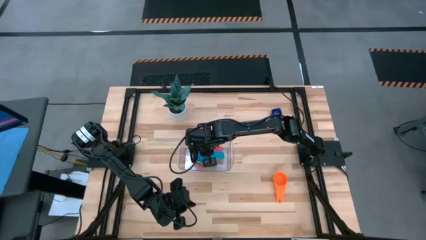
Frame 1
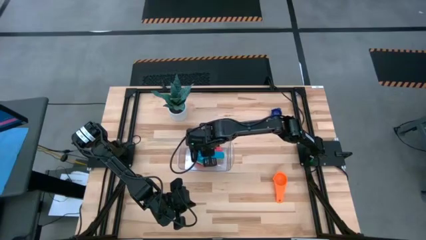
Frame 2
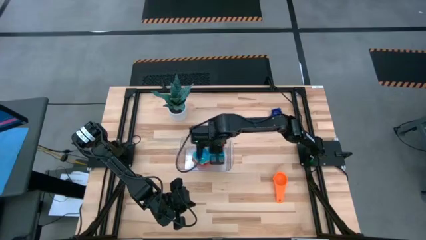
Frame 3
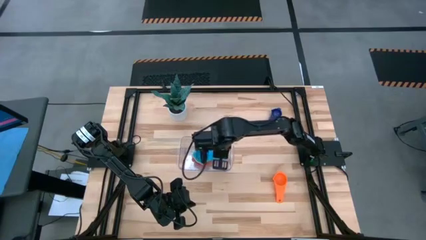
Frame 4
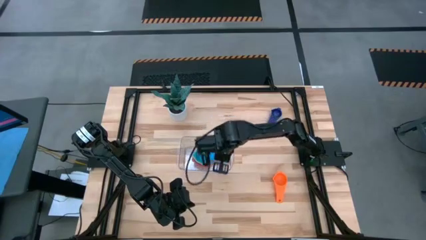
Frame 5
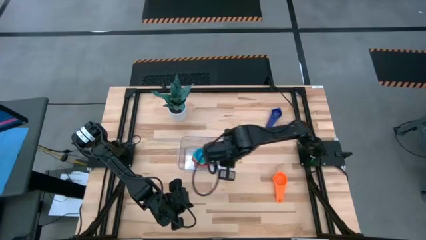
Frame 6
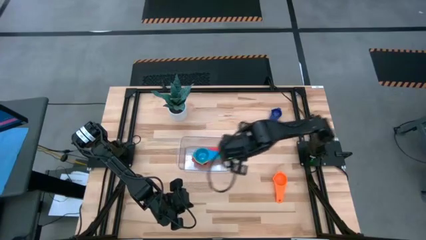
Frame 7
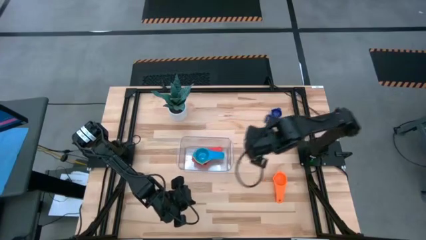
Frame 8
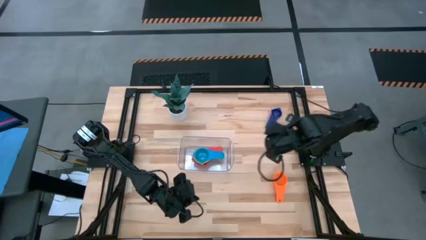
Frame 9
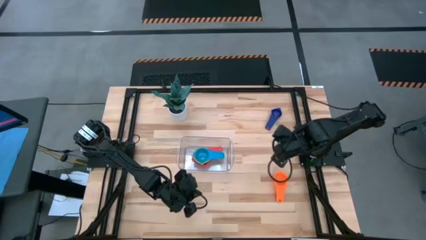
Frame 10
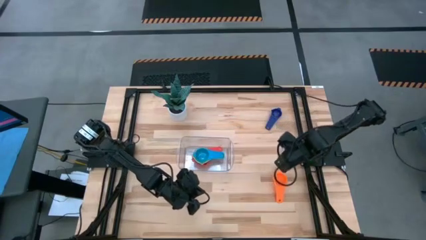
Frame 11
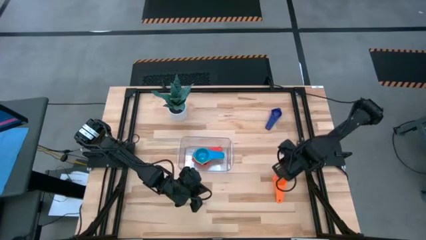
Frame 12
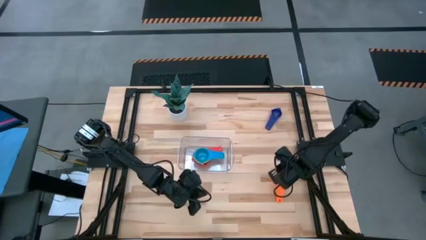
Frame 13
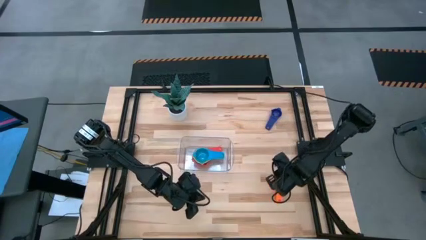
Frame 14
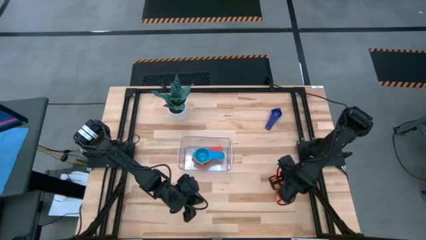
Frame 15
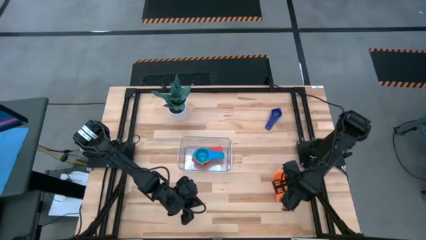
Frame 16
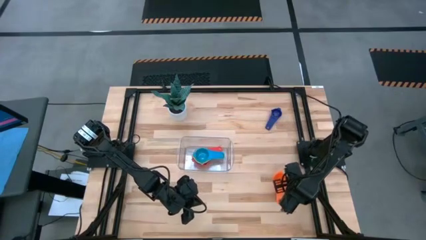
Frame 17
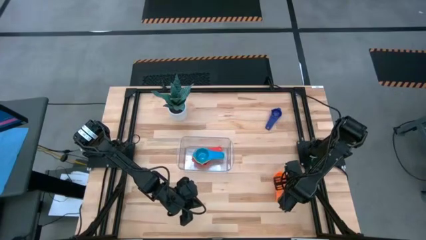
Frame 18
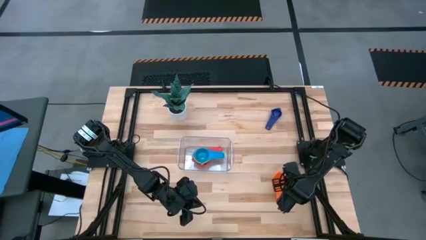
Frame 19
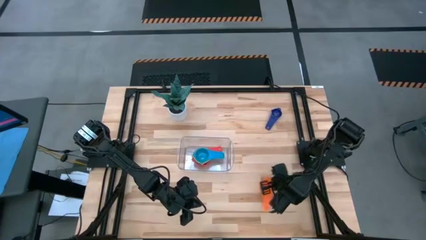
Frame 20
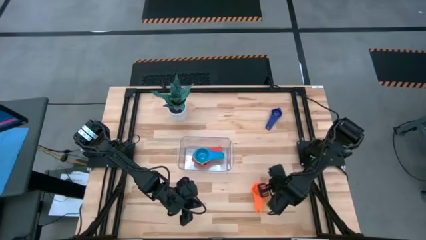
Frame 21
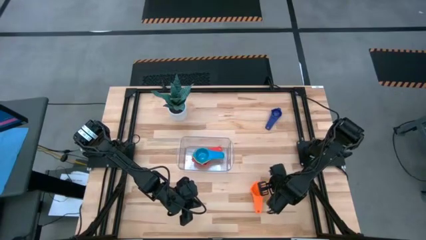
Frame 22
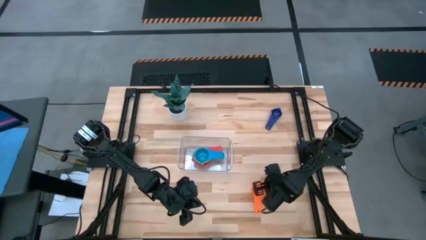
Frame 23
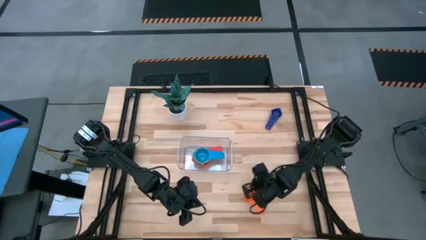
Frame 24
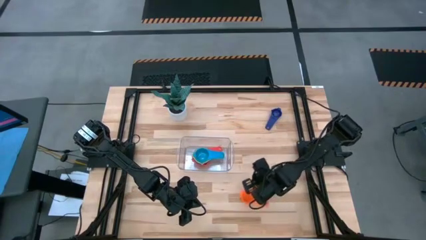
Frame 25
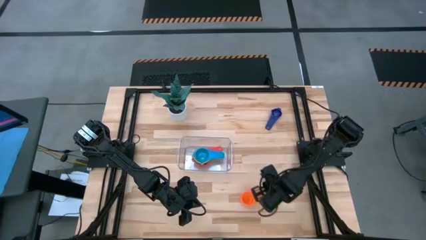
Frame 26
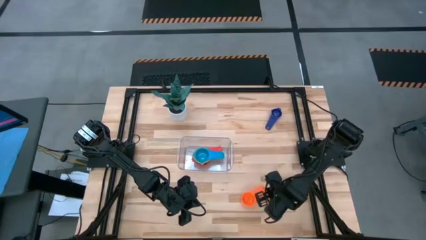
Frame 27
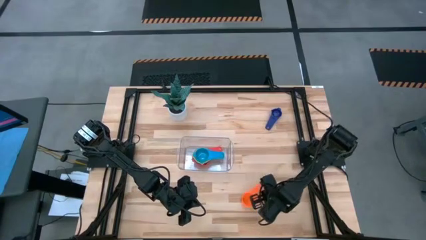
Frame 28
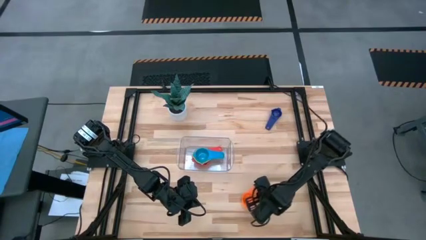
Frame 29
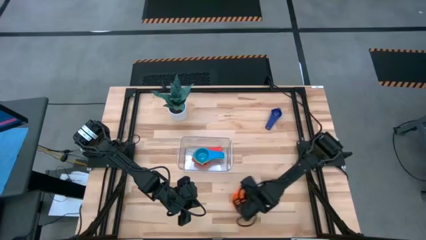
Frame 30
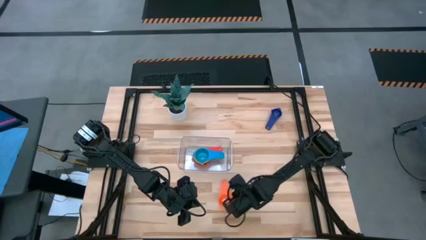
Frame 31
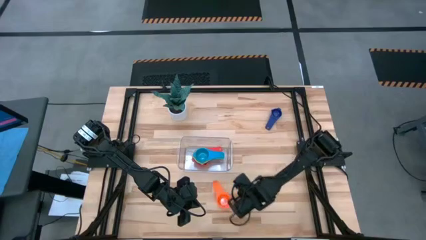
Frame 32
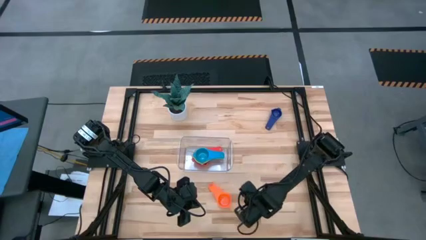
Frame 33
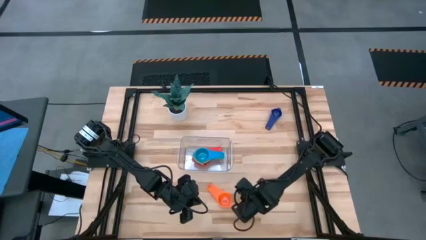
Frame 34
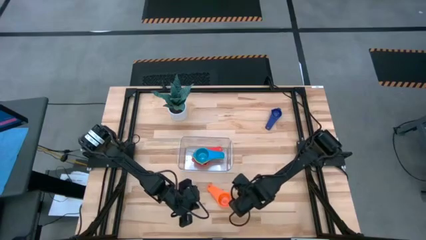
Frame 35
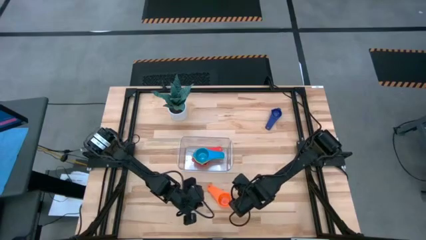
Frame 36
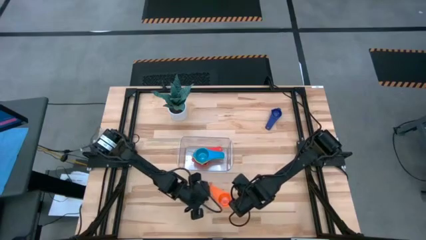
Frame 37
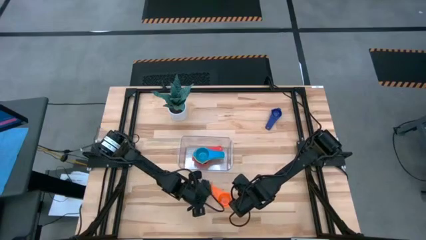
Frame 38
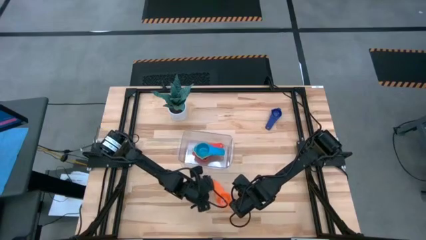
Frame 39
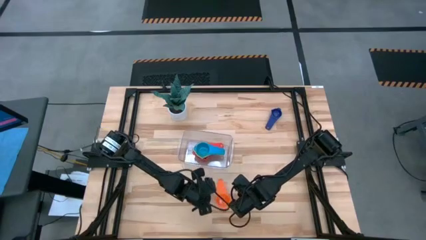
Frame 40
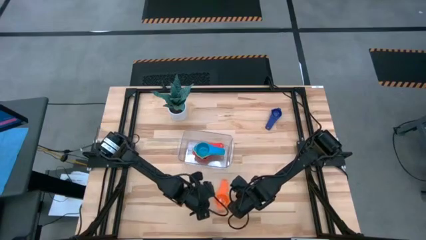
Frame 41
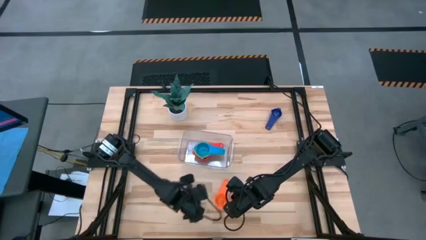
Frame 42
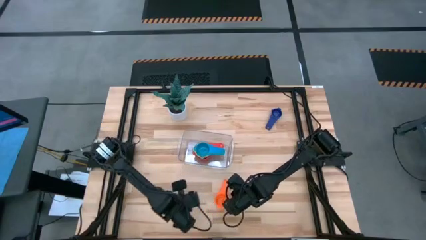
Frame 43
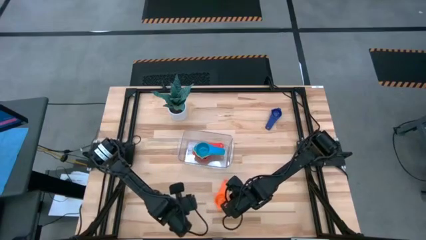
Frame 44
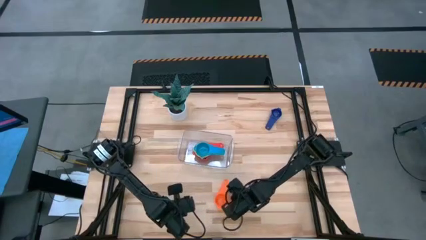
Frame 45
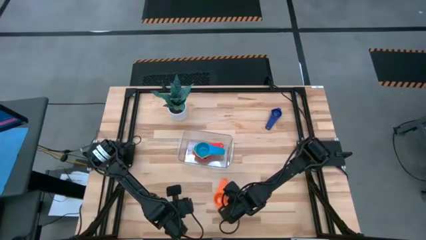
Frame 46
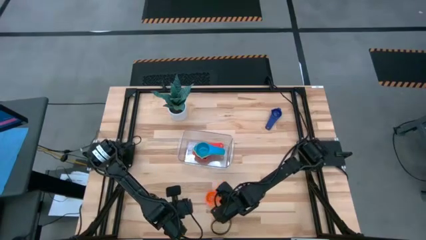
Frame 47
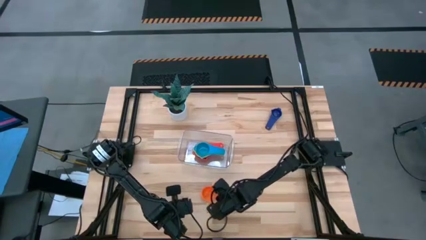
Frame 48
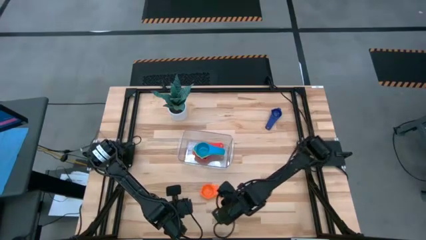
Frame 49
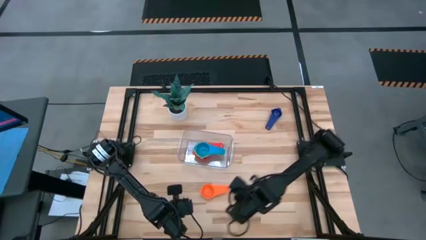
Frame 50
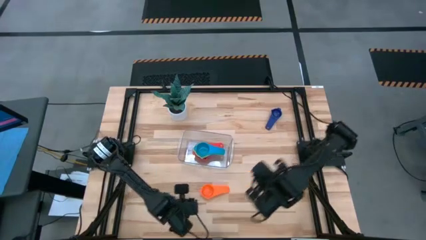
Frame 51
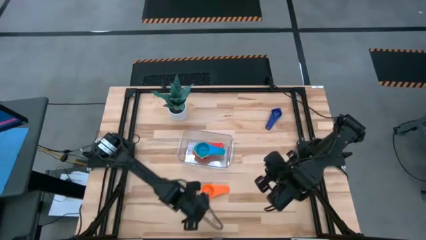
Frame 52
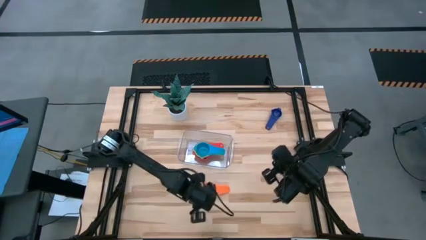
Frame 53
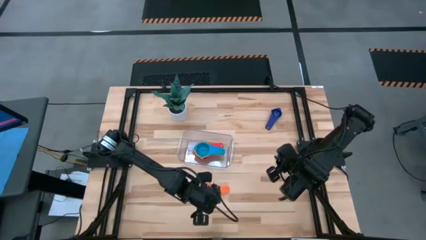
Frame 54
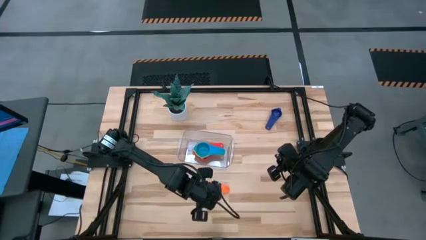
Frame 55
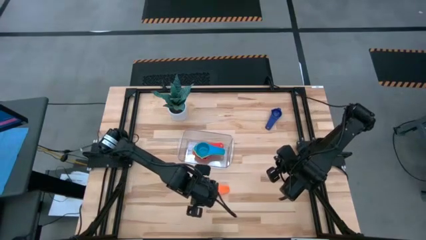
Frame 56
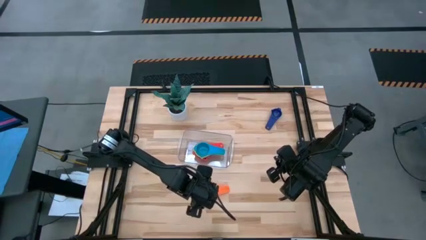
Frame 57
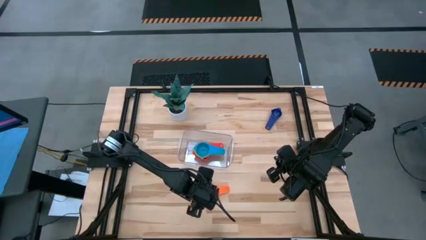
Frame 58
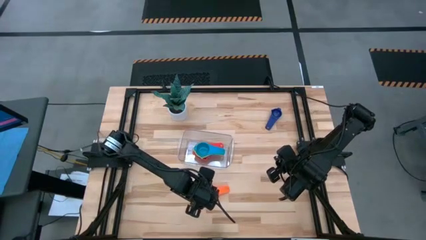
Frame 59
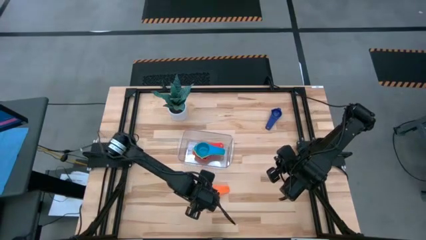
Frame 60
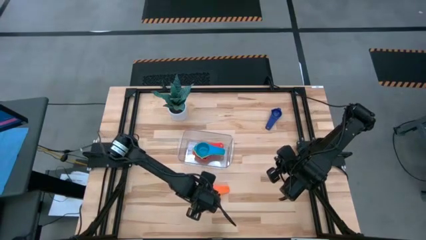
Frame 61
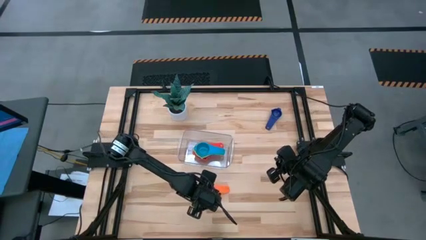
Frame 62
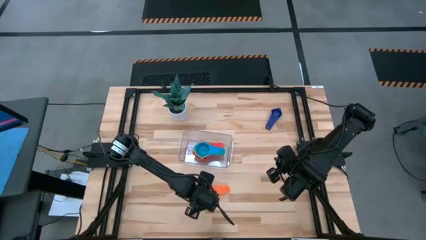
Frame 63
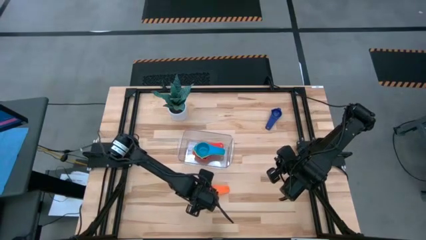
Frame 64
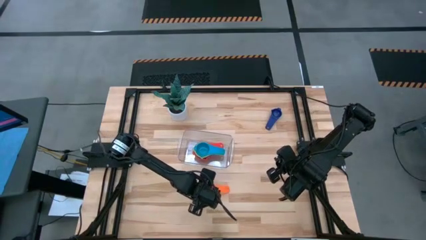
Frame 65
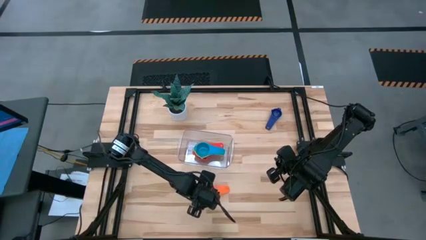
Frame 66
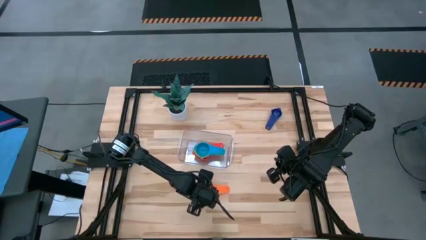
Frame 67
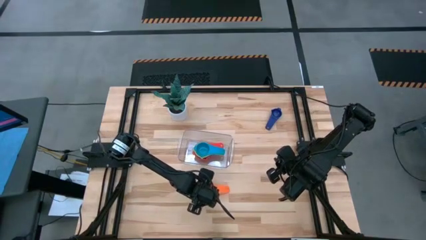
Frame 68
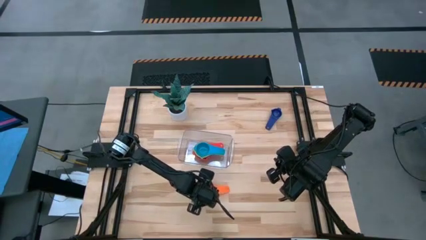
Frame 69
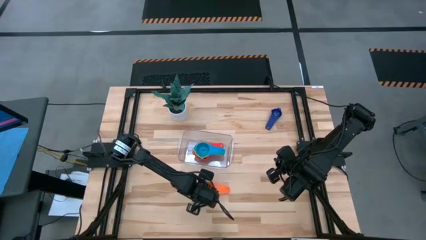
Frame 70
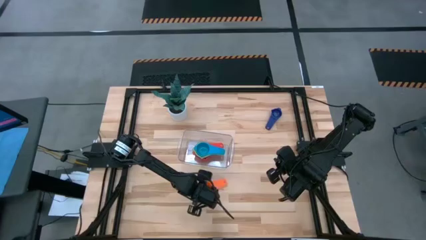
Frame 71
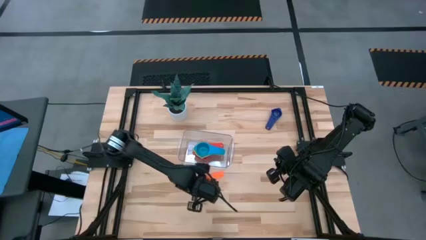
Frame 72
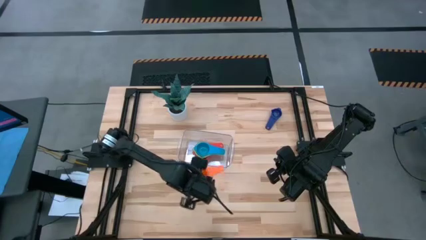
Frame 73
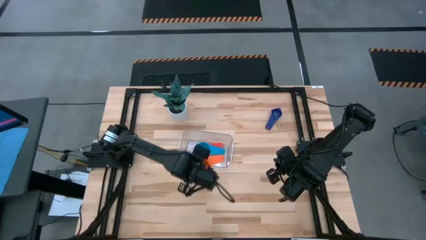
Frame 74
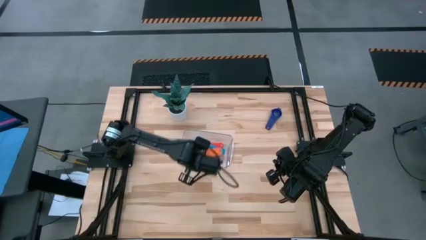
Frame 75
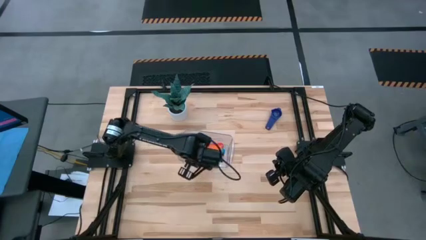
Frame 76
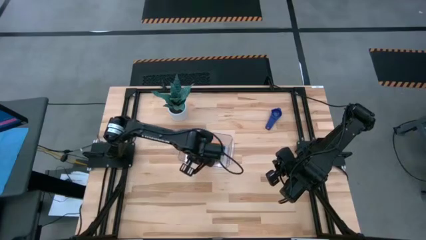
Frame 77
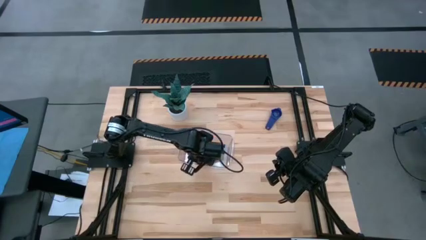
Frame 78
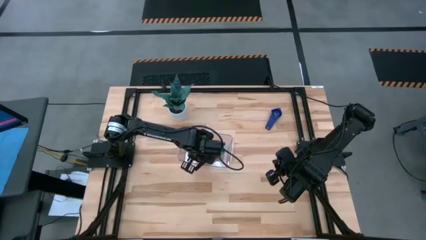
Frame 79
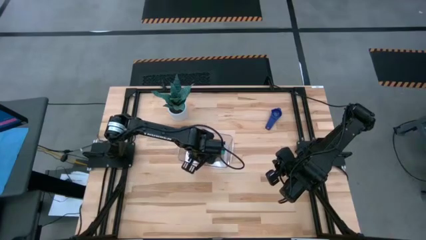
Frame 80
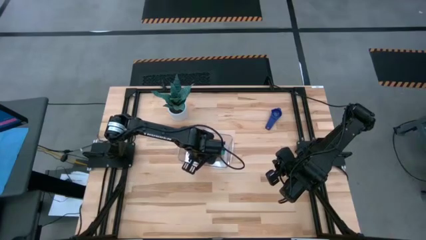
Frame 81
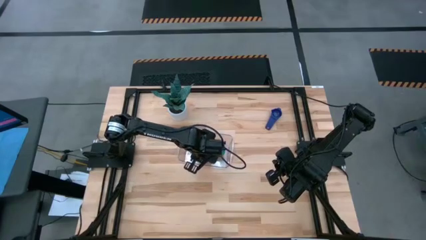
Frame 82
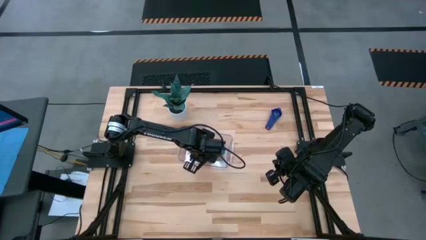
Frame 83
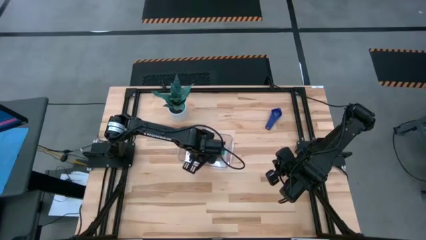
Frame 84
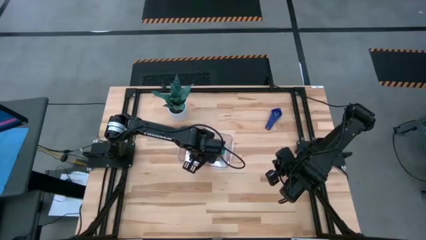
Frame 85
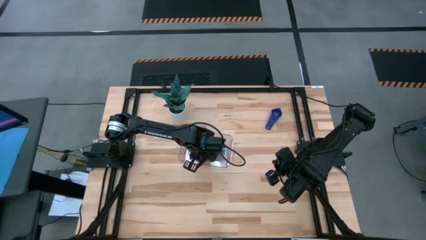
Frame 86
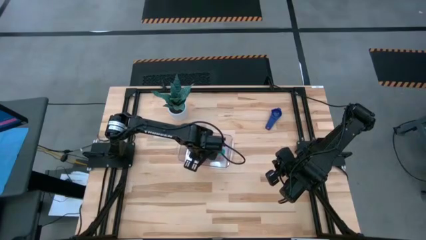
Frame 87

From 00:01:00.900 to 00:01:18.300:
Task: Nest measuring cups in basket
Stack the orange measuring cup into the light blue measuring cup
